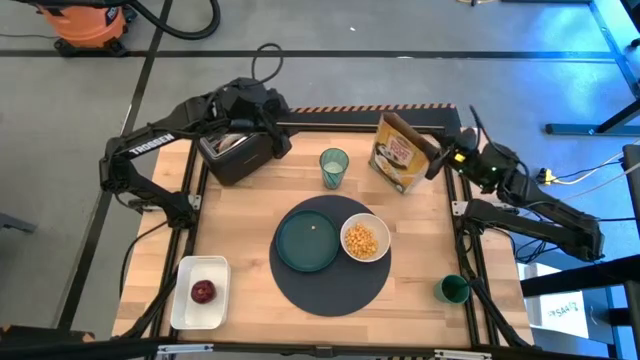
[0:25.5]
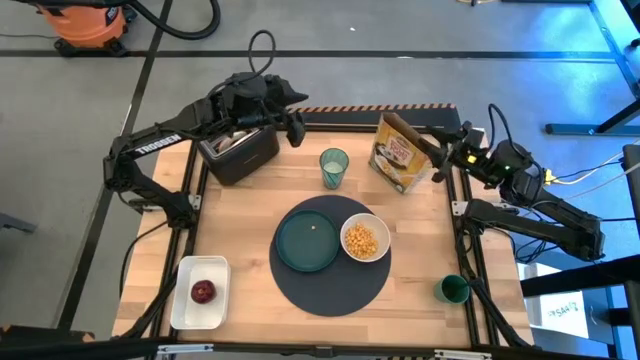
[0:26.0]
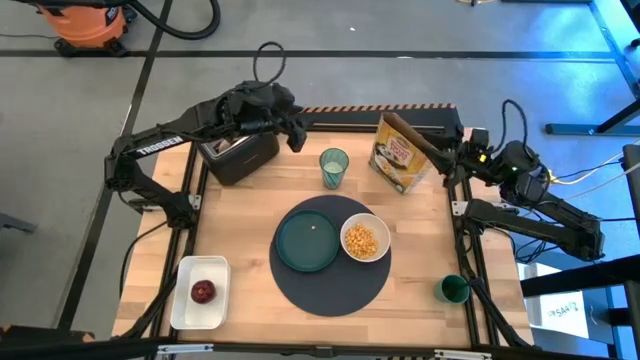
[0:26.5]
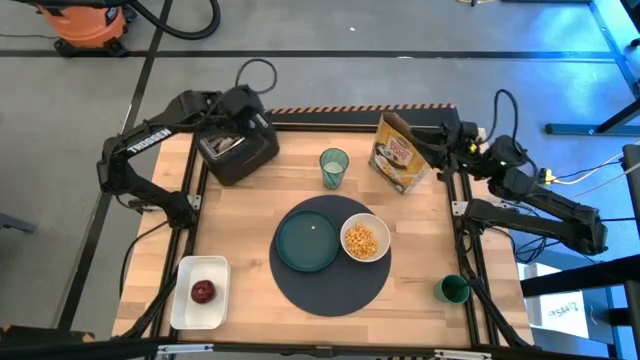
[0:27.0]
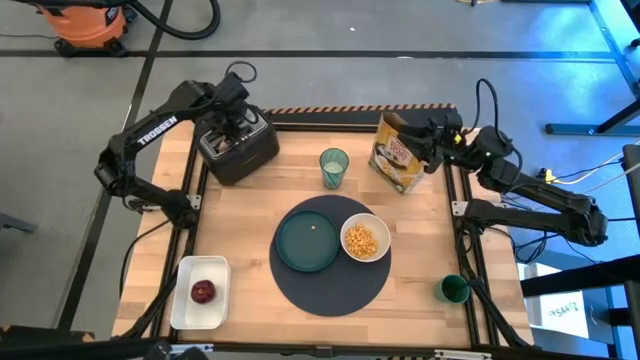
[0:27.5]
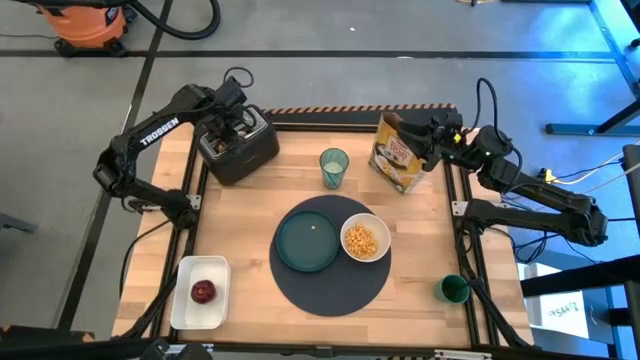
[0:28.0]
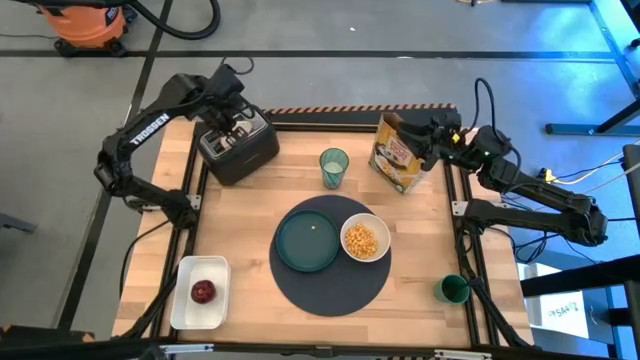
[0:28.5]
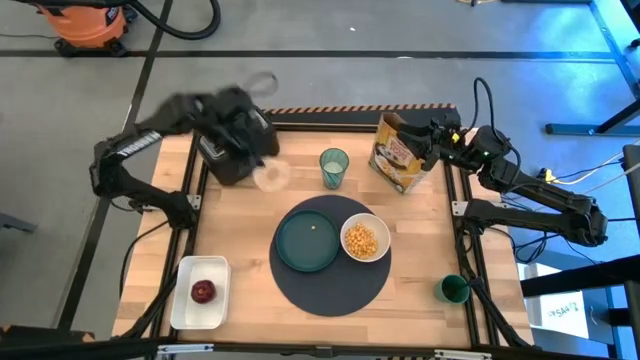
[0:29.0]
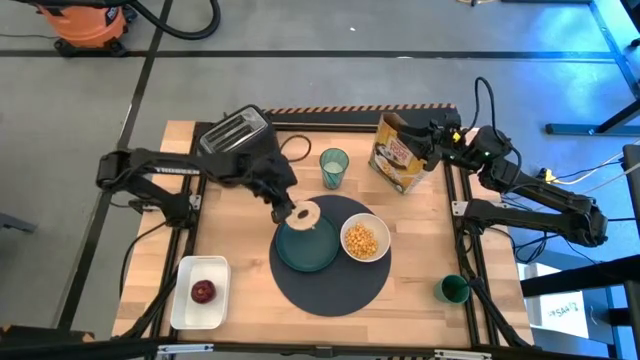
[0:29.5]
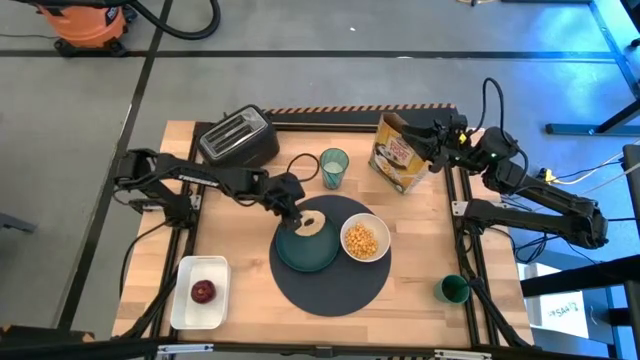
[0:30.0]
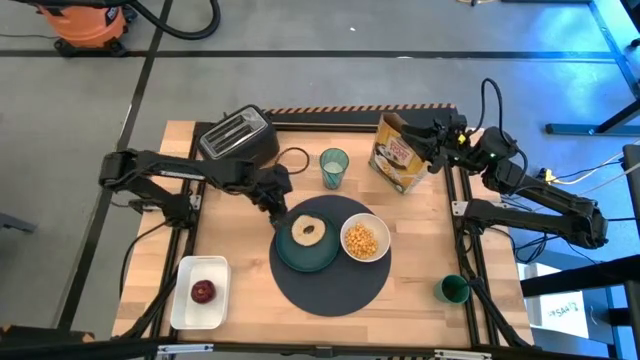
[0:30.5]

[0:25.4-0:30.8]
Task: Arrange a breakfast setting
Put the bagel on the green plate

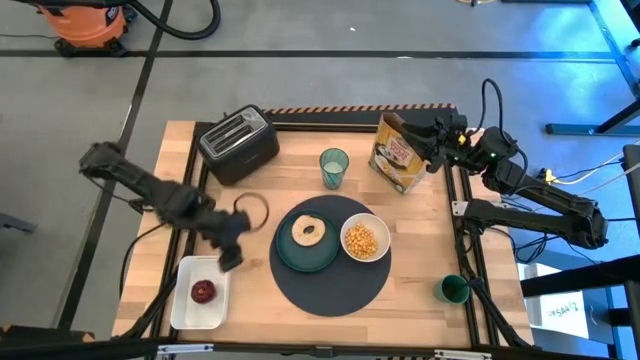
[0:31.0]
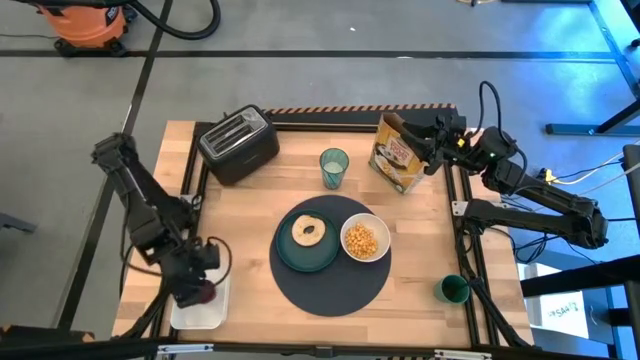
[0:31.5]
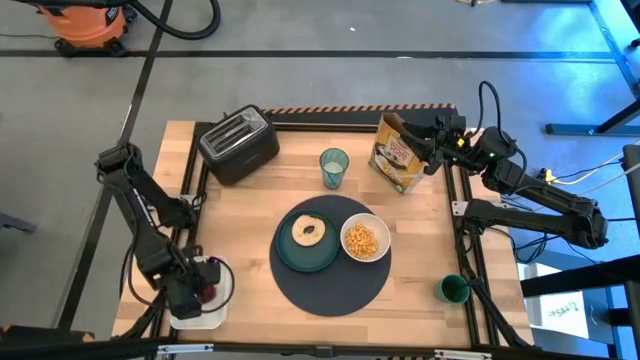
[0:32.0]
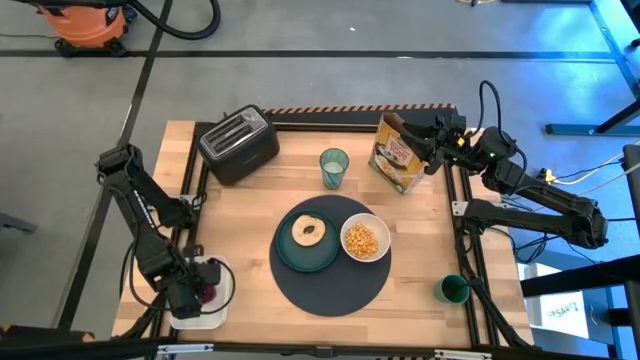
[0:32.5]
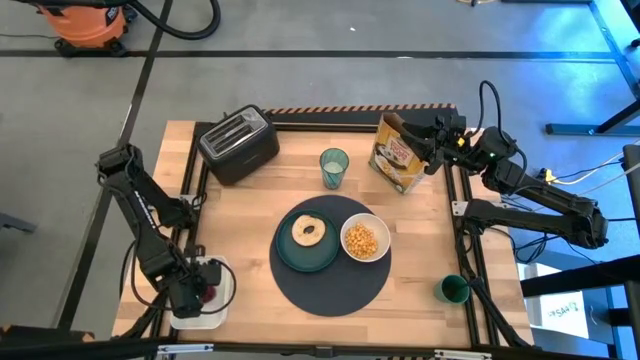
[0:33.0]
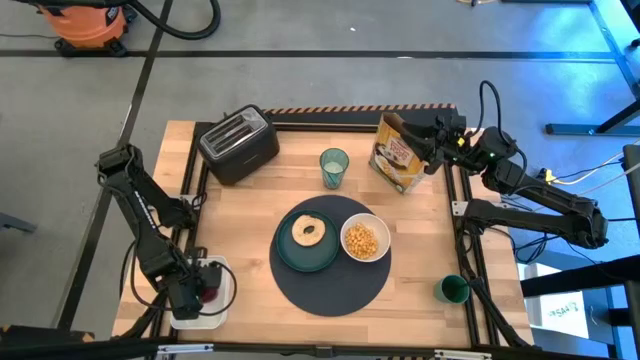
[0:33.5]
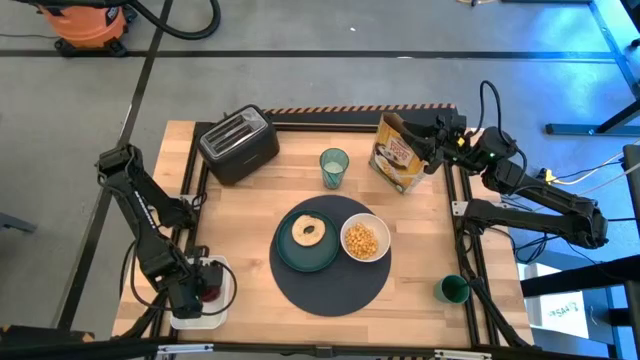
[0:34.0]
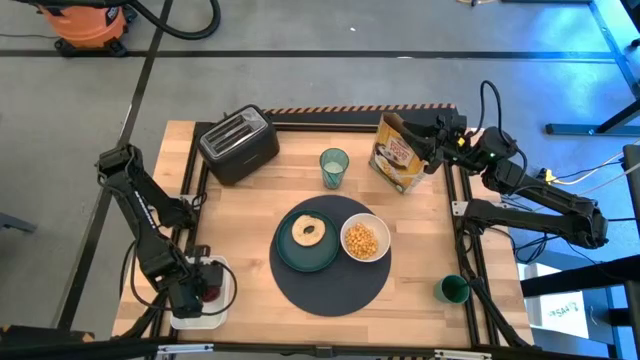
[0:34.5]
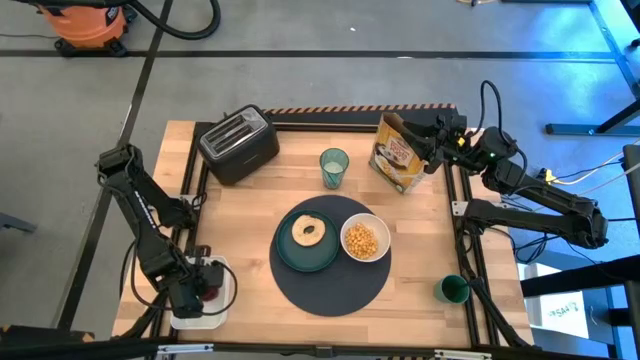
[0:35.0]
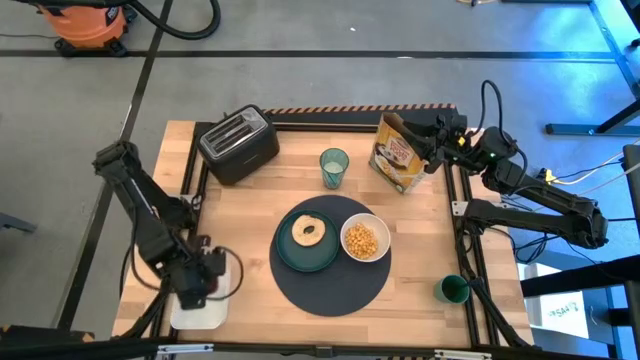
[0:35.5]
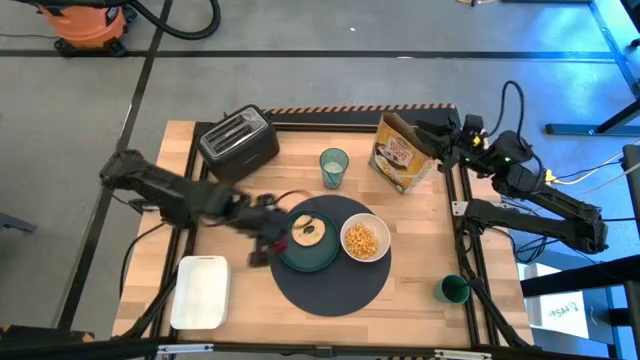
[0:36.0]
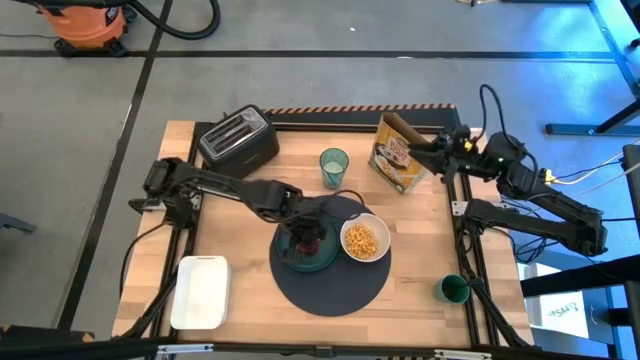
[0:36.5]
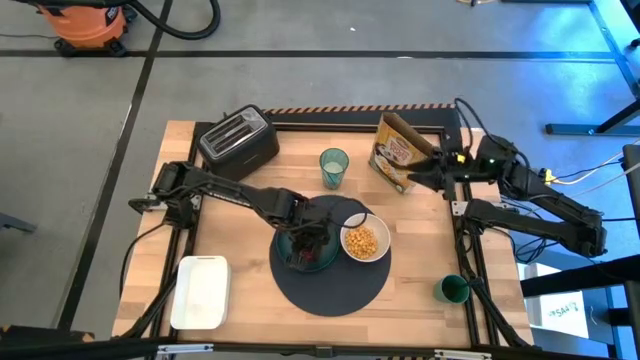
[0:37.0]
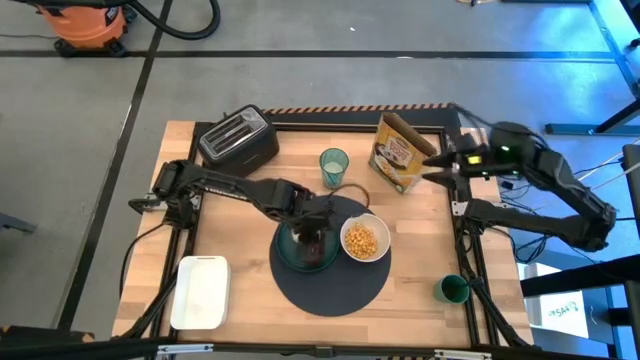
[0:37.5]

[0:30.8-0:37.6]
Put the red apple onto the green plate

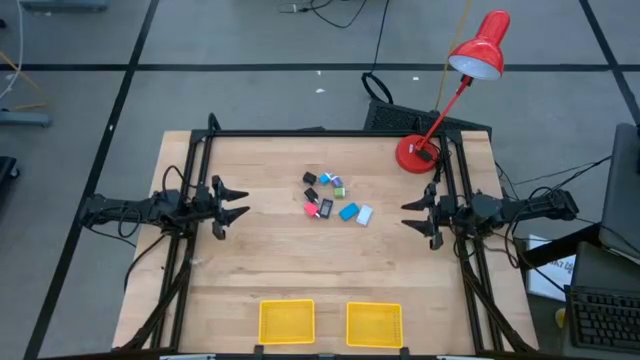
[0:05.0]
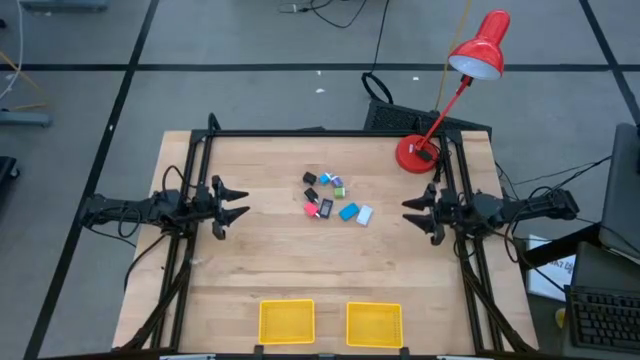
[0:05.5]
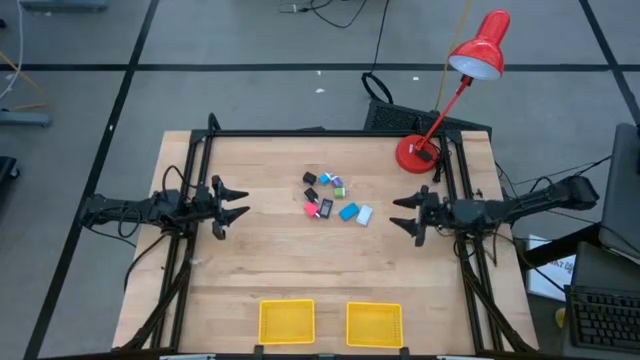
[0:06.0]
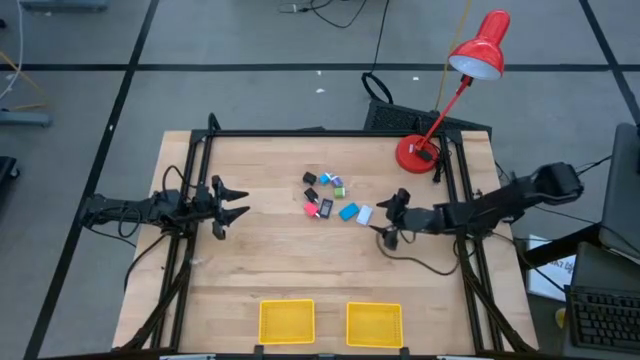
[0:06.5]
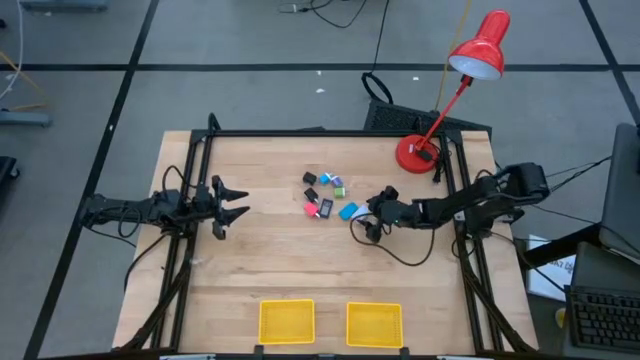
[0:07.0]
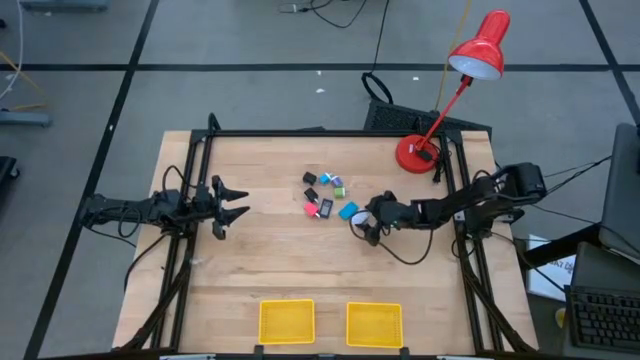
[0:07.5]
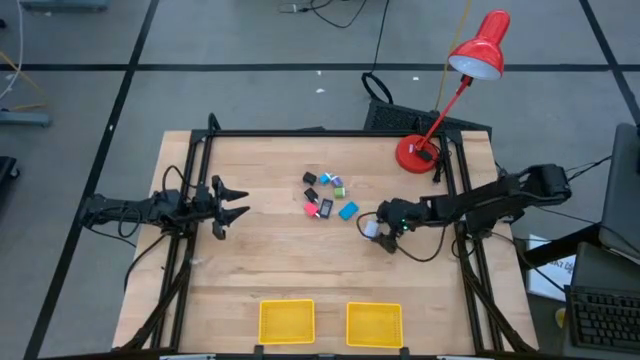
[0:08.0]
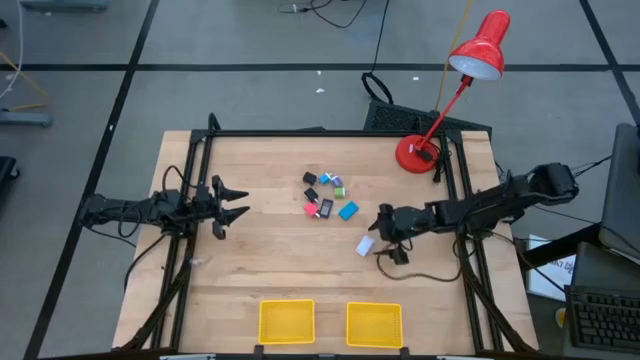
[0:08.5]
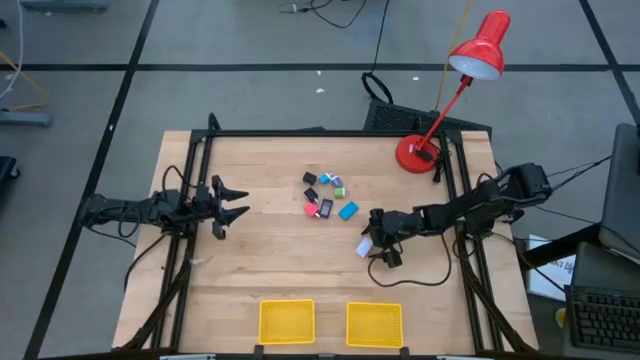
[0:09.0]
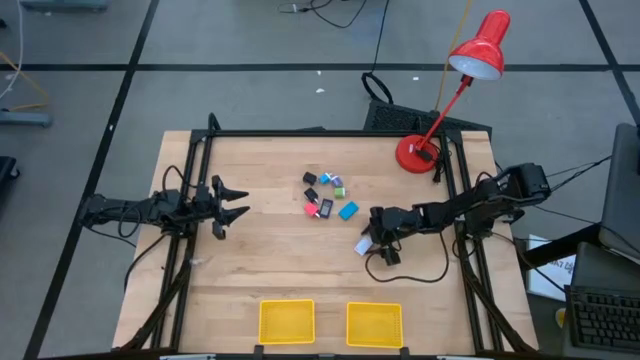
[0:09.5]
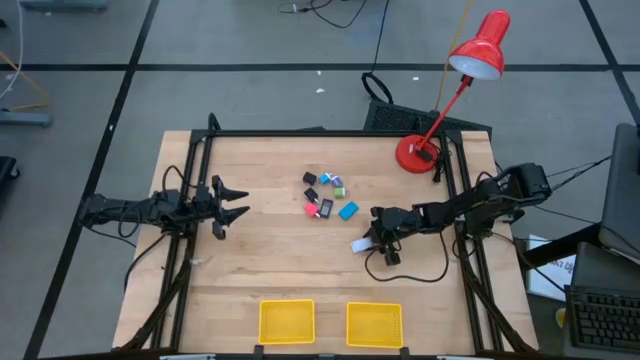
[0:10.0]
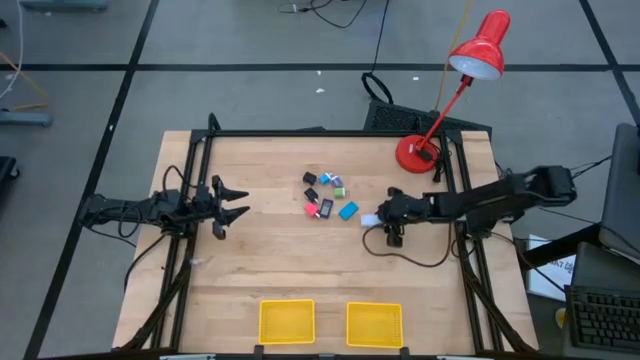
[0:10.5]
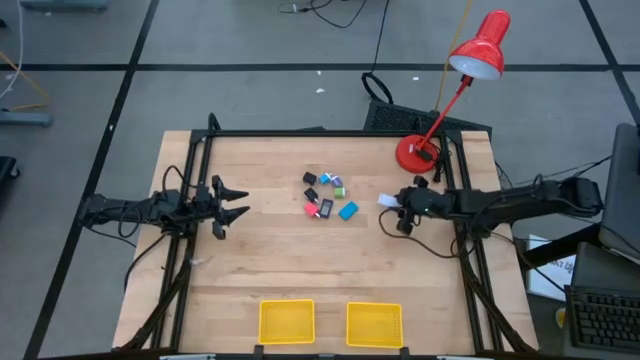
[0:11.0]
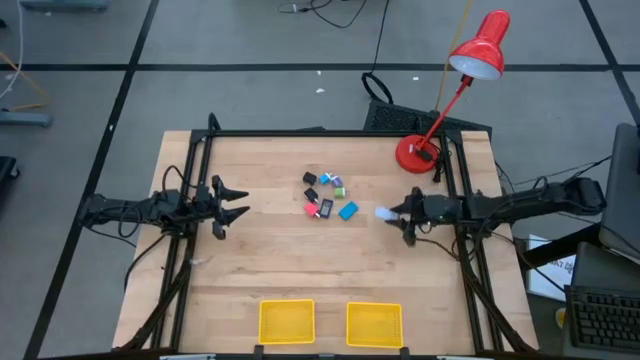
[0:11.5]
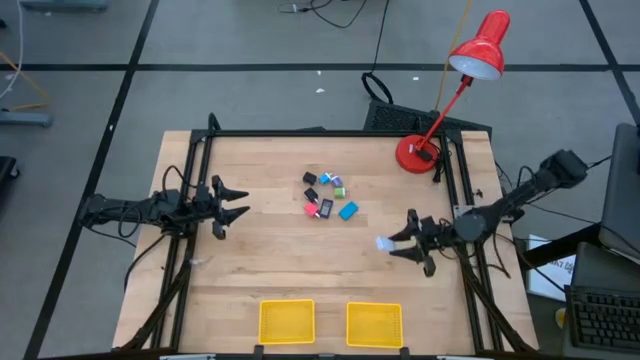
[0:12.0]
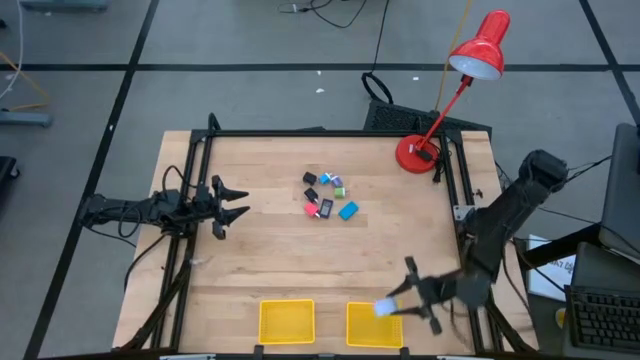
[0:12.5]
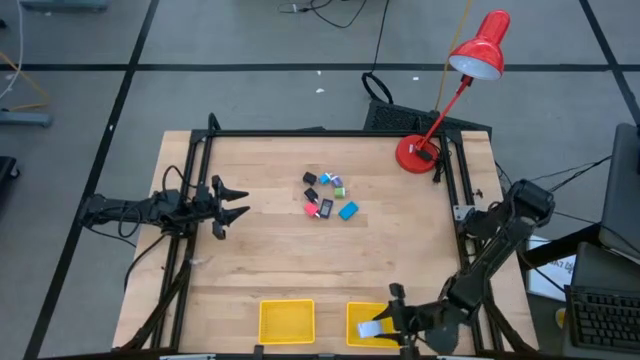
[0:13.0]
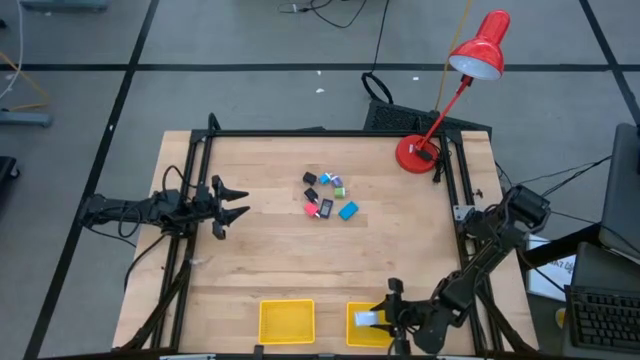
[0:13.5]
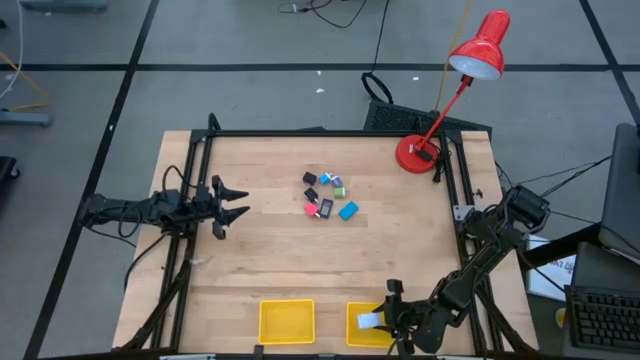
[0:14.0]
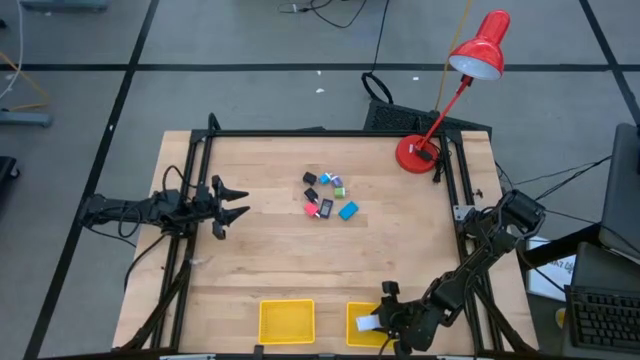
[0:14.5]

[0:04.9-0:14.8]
Task: Pick & Place Office items
Put the white digital clock into the right yellow bin
